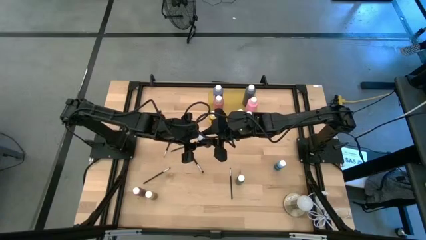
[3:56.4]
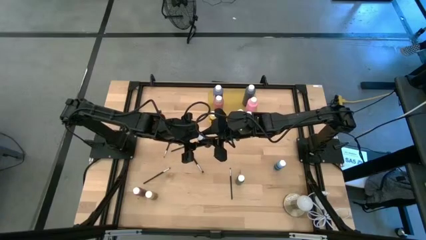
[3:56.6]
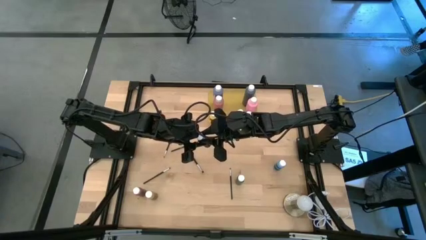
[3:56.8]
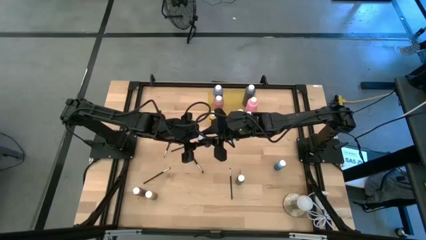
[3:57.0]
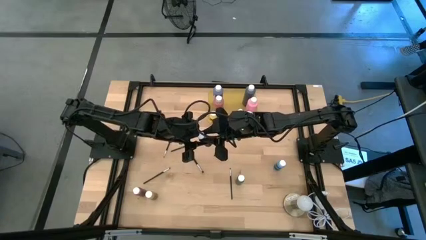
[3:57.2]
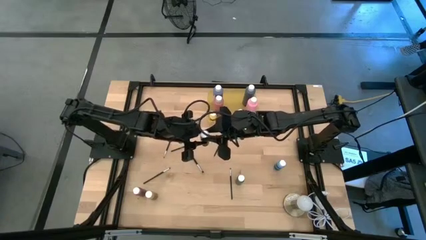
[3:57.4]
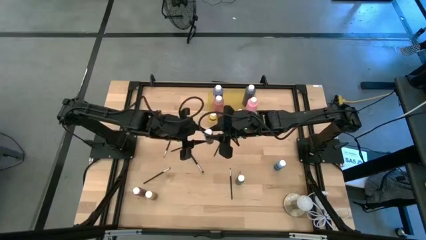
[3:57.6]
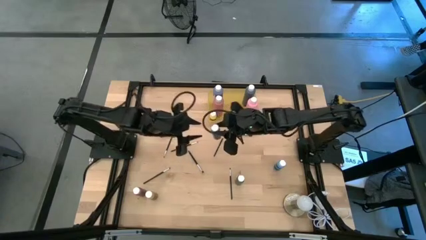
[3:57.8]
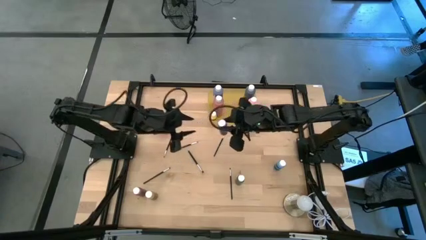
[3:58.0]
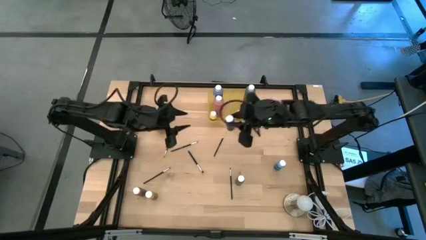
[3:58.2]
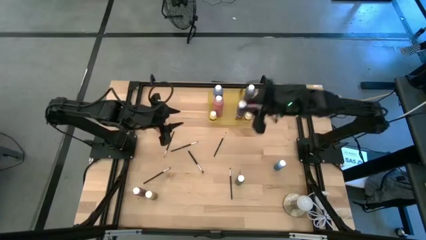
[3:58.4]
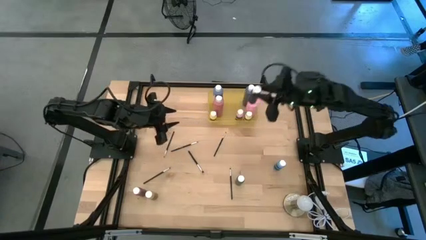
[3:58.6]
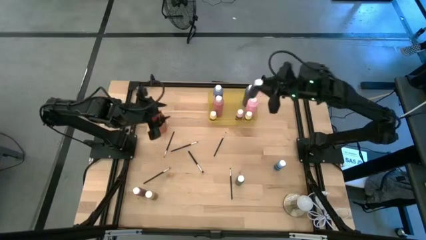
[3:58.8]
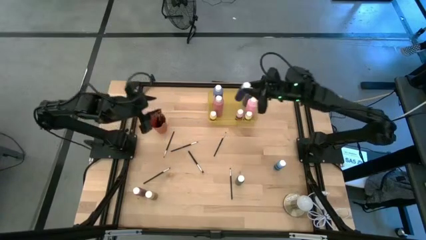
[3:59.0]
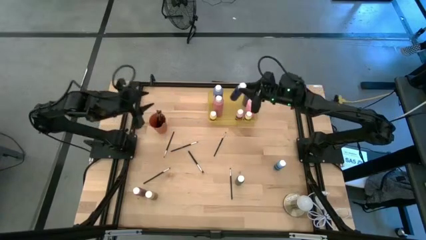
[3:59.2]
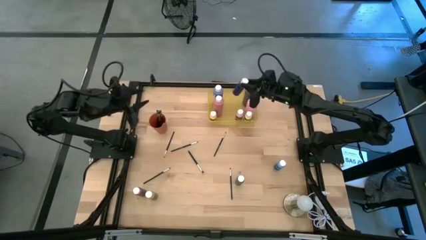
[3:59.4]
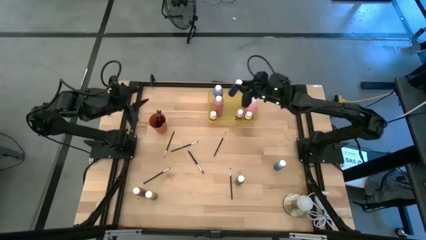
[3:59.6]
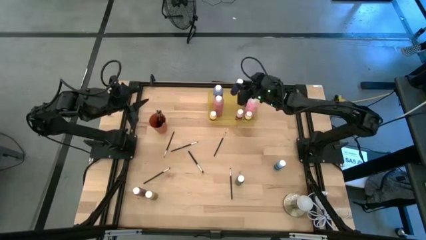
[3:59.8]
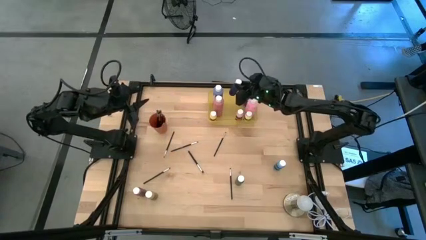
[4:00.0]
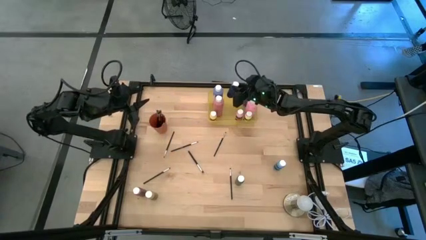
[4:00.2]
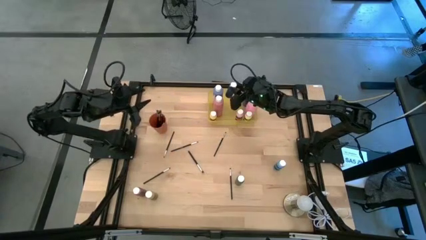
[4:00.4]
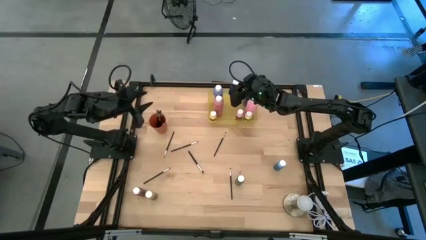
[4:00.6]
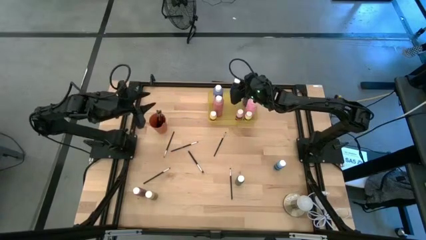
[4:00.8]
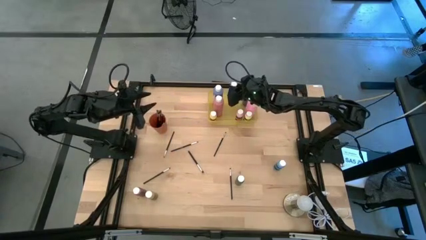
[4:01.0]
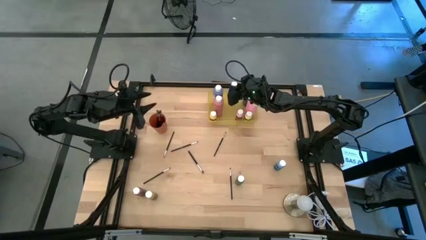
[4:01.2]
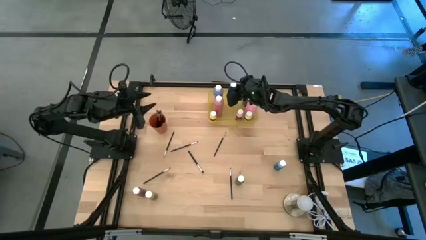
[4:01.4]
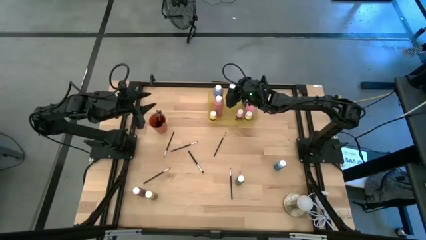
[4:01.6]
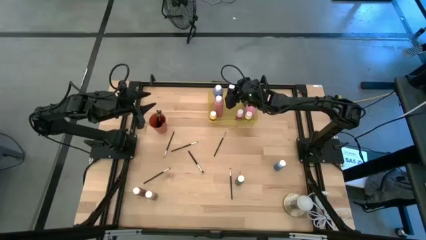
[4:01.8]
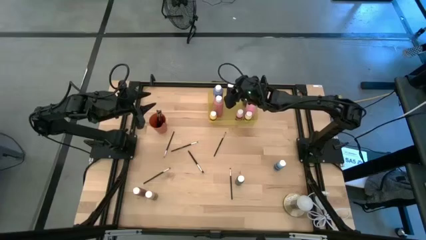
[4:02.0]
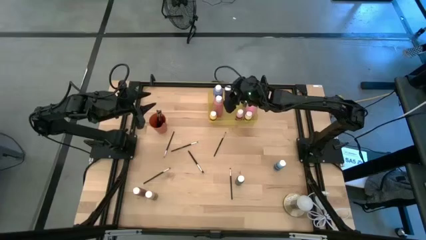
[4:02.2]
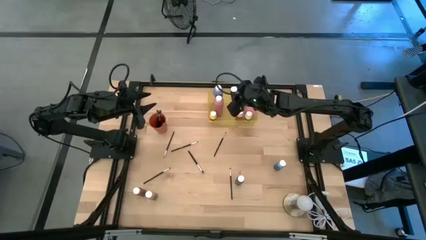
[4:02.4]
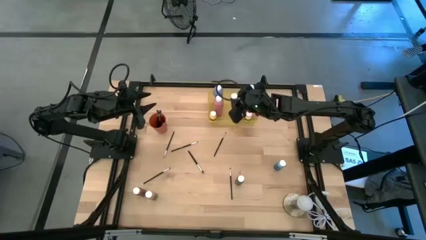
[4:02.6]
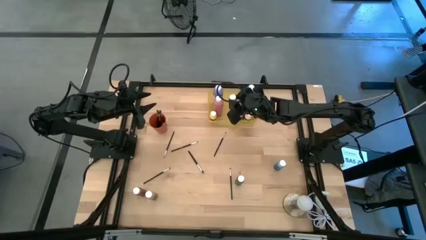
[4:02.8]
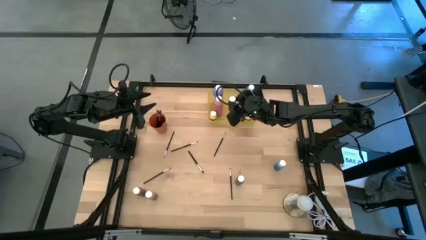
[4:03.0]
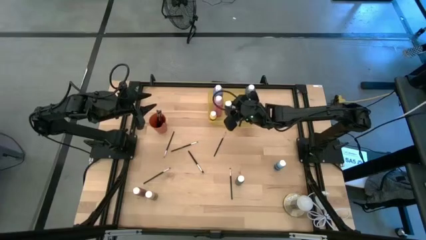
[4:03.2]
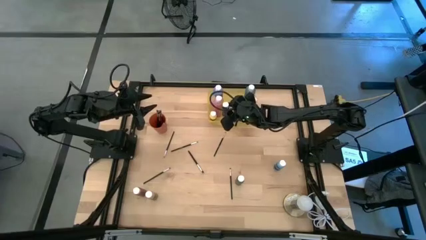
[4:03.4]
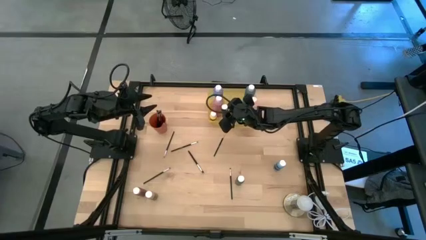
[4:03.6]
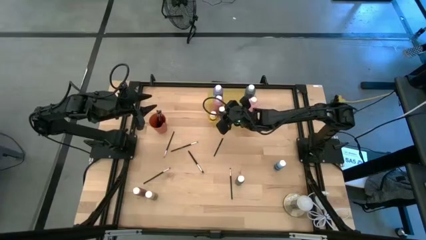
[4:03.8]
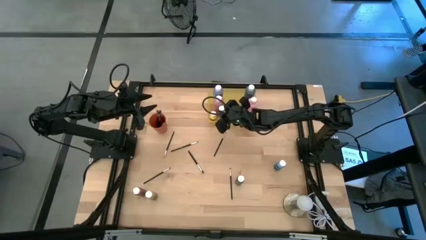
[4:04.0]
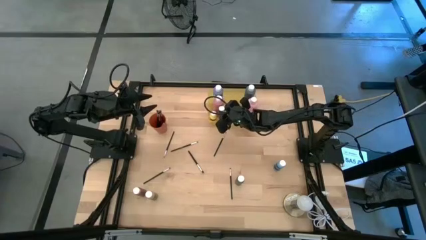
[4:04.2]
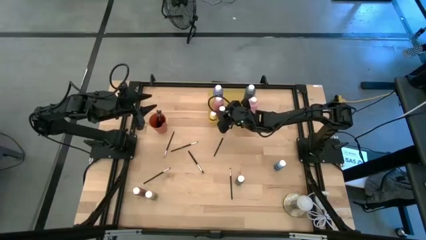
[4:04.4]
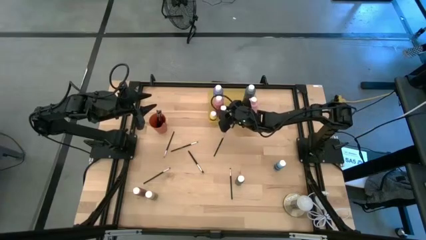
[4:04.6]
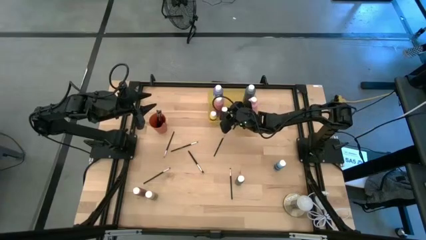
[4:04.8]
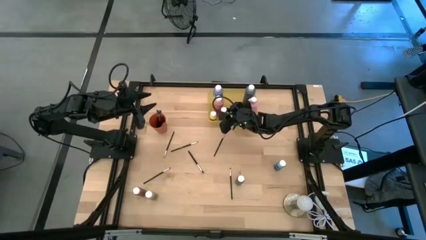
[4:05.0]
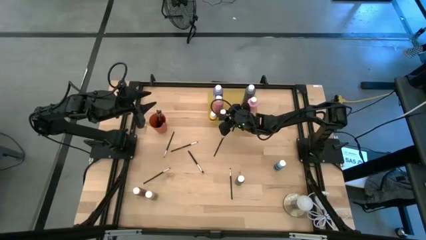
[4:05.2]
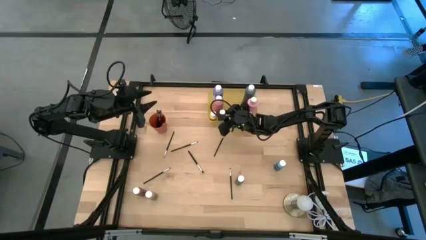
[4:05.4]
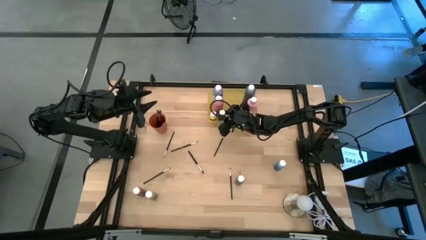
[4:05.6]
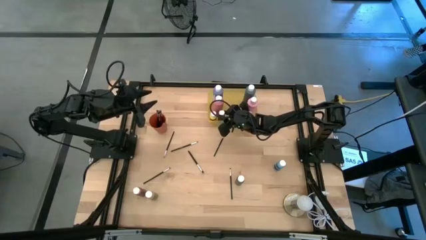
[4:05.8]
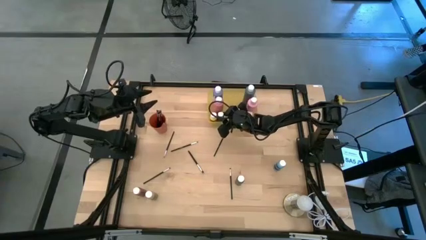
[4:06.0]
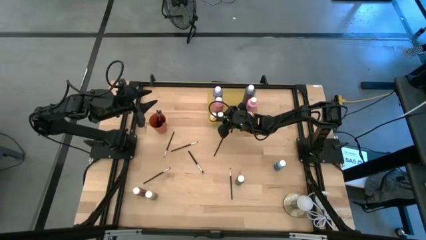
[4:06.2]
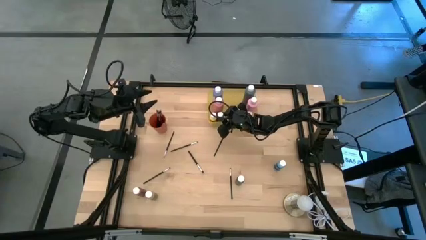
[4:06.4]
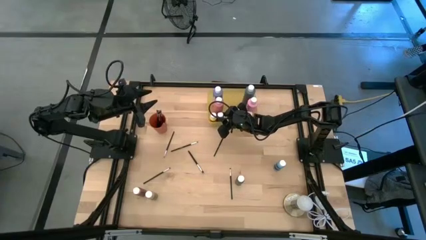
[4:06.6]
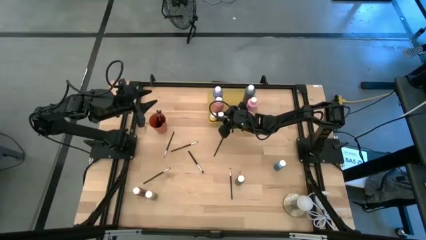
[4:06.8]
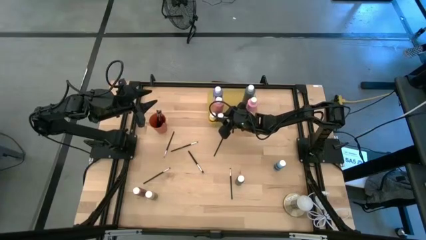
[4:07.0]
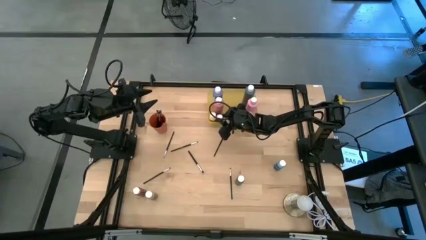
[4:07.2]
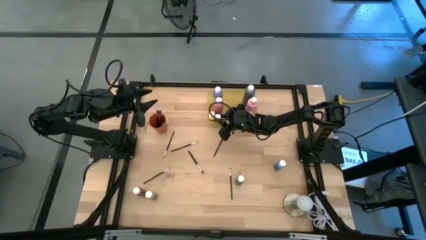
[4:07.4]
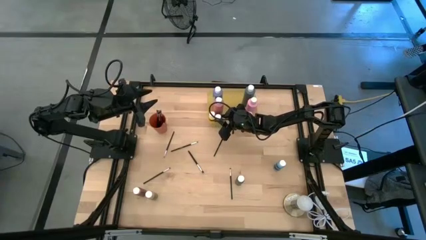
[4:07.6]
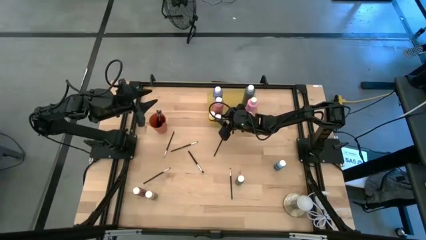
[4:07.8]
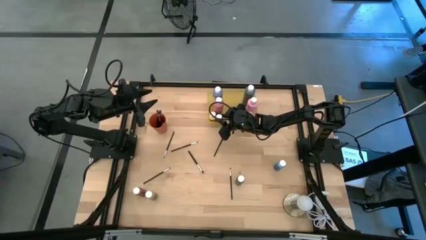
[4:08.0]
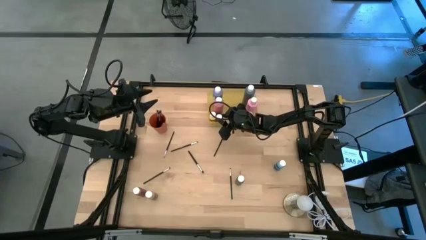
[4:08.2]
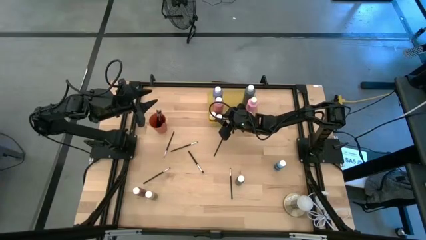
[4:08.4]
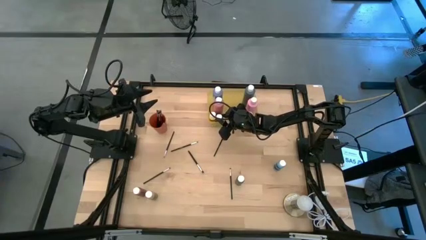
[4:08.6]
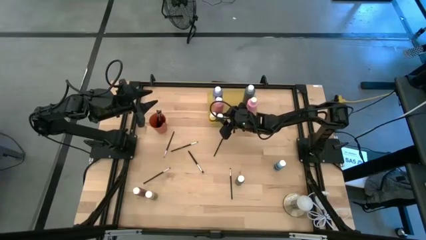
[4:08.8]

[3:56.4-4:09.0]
Task: Pick & Place Paint Supplies
Put the small dark blue paint bottle into the yellow bin

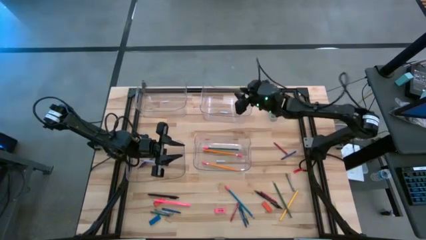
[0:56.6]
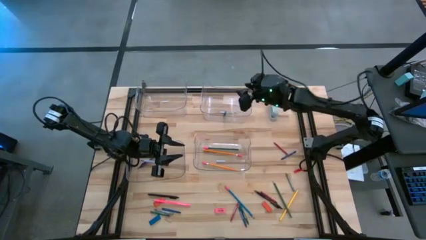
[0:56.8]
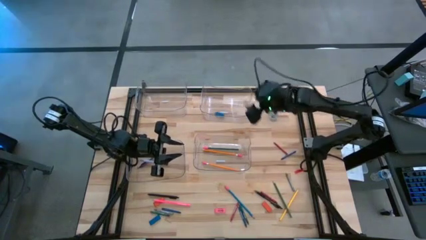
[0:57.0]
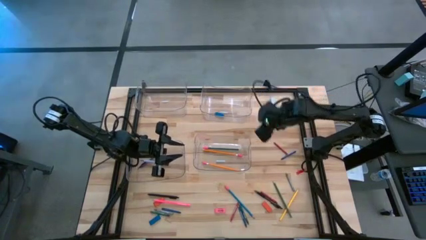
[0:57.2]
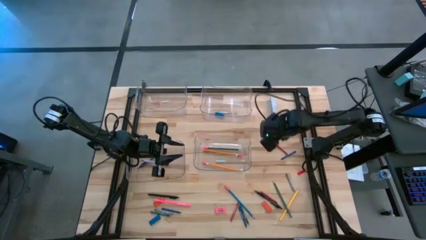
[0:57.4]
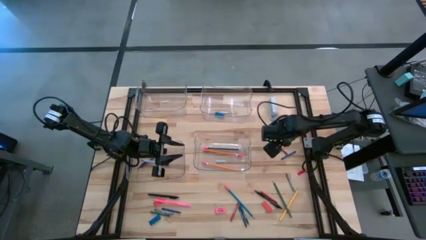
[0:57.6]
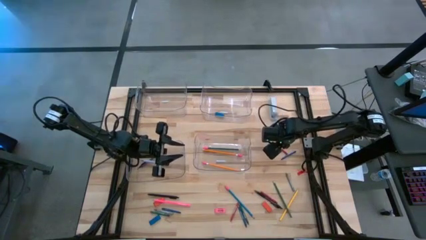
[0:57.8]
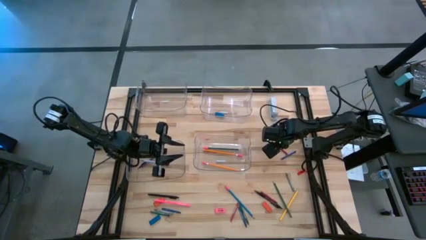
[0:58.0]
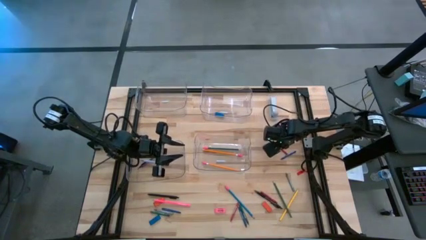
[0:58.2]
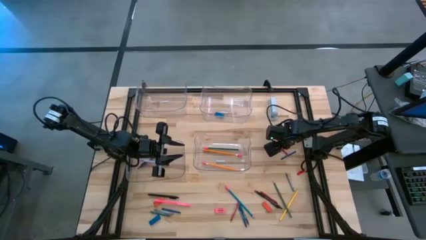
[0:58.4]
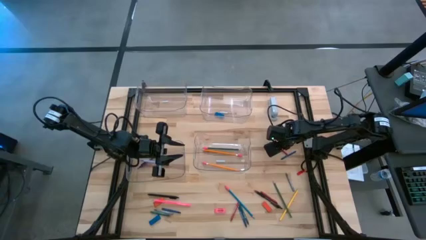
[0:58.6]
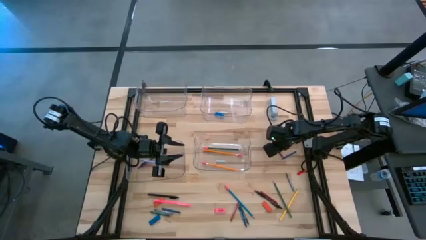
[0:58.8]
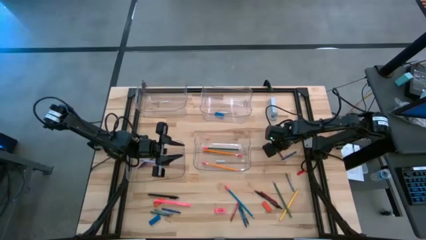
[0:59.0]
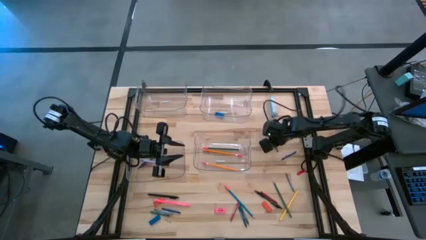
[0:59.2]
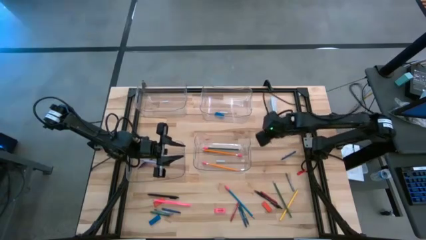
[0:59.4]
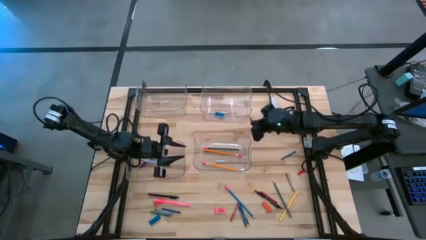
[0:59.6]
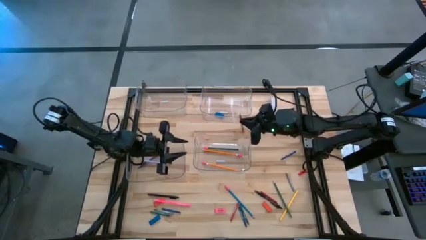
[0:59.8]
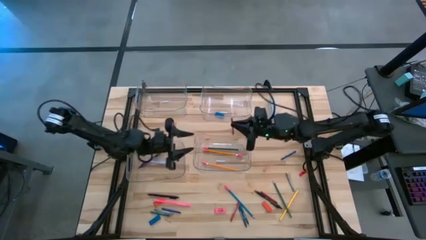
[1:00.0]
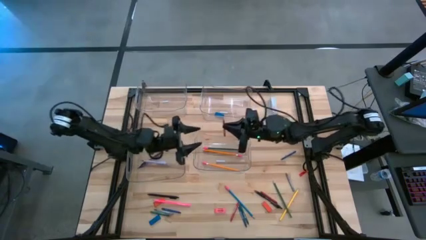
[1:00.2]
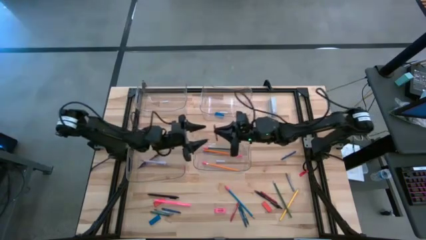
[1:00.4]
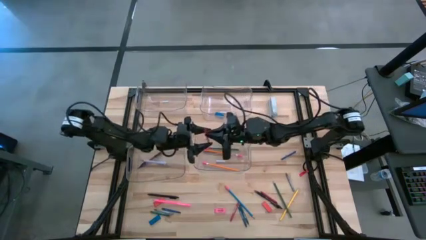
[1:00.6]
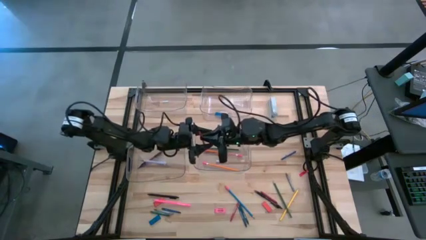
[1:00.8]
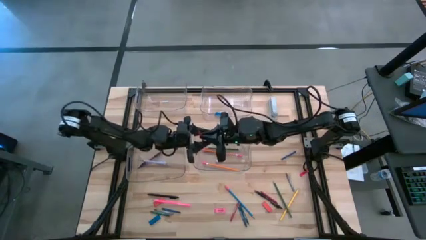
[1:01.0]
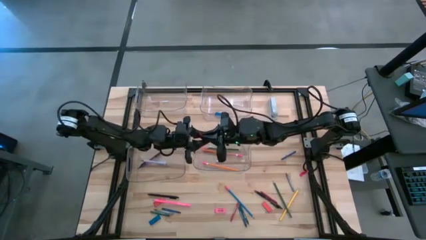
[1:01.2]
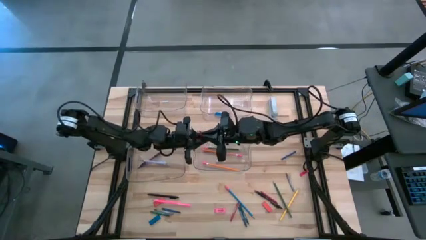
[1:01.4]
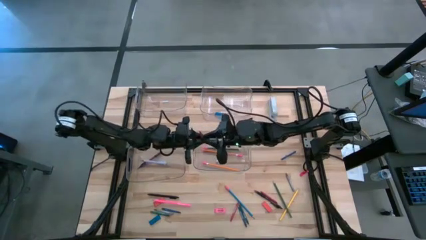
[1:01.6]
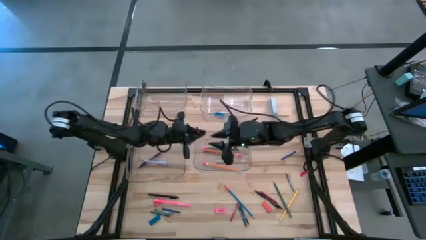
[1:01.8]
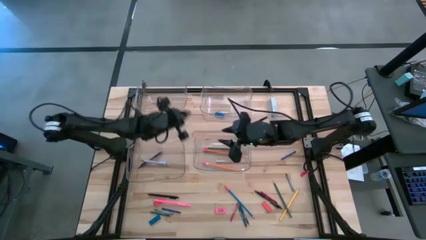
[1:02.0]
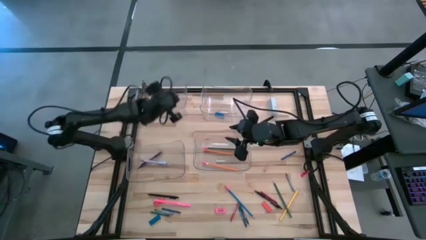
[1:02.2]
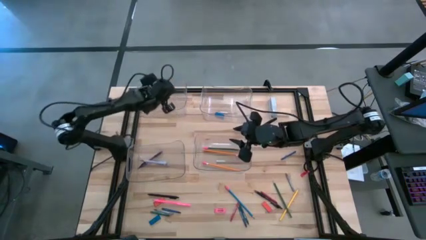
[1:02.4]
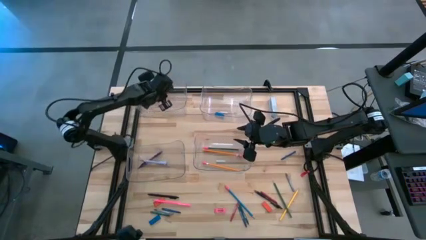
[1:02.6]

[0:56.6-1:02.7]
Task: Sort crayons/erasers/pens/pencils in bins
Put the top red crayon into the top left transparent bin
